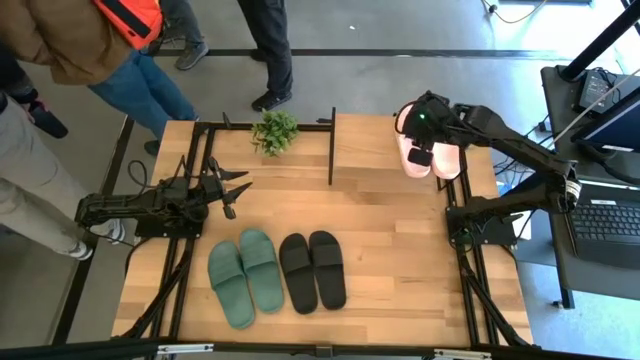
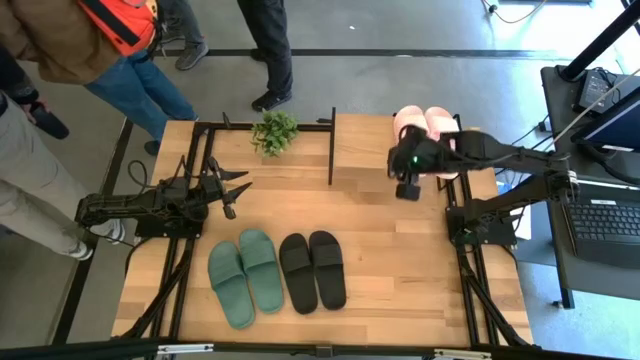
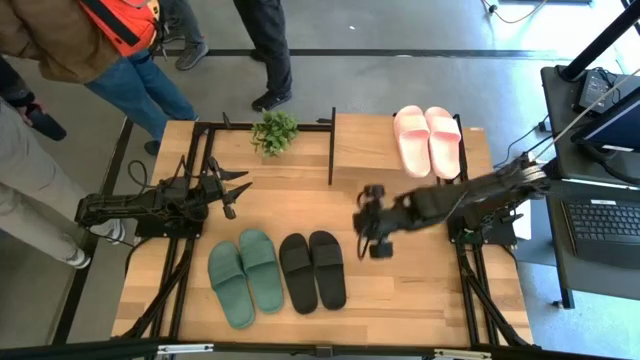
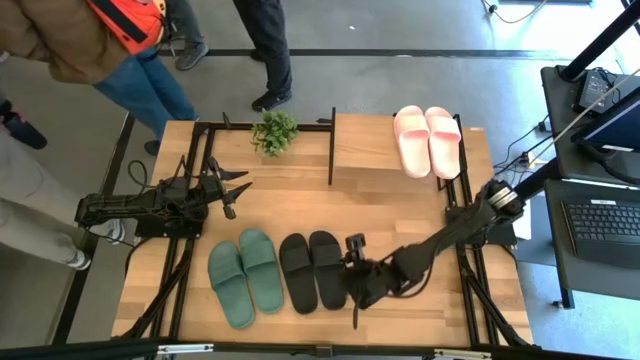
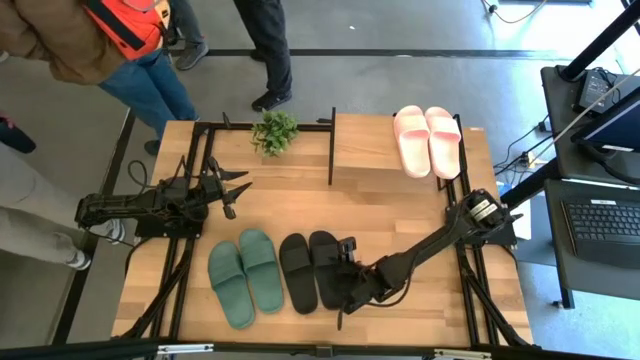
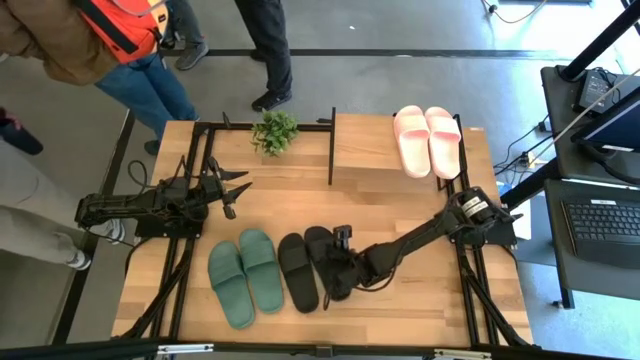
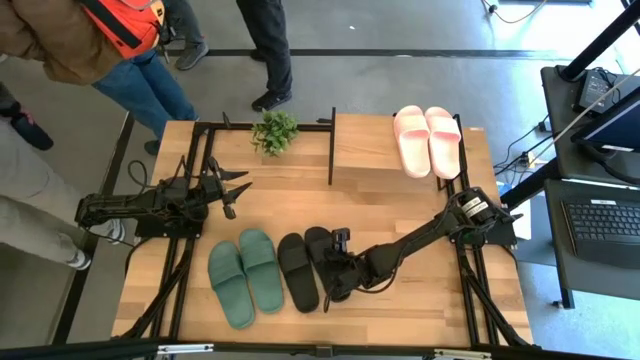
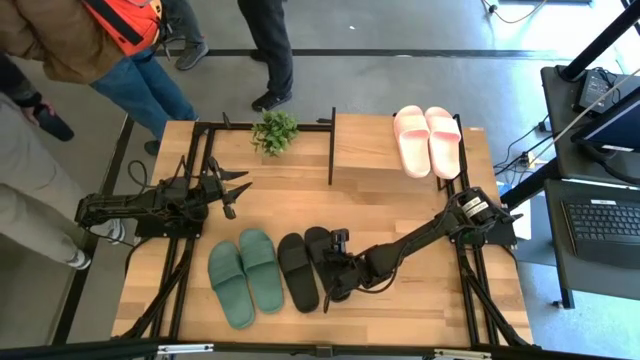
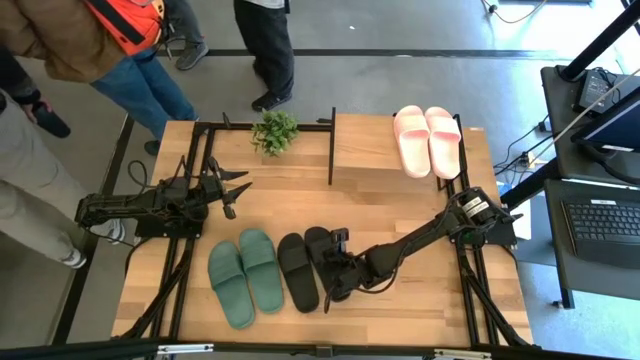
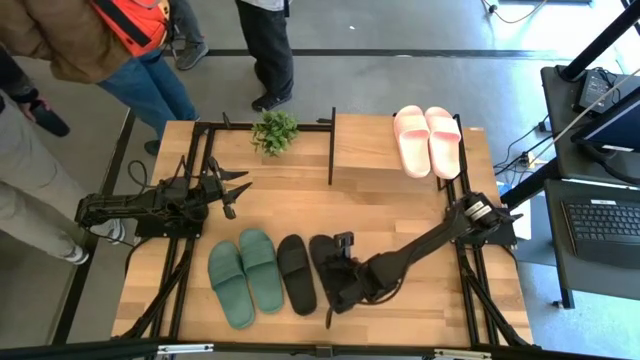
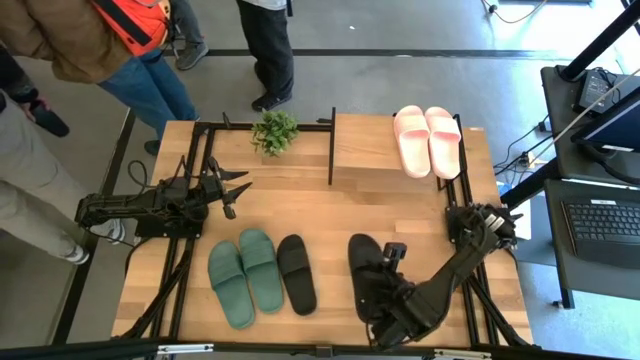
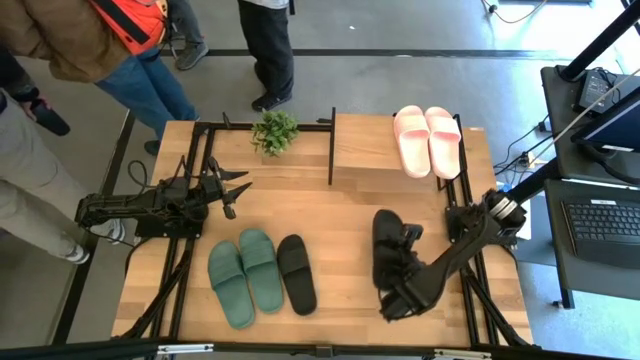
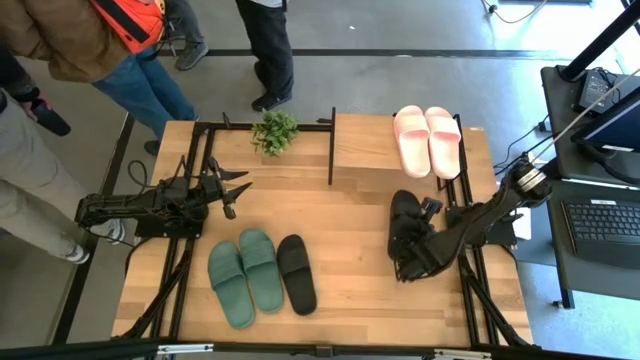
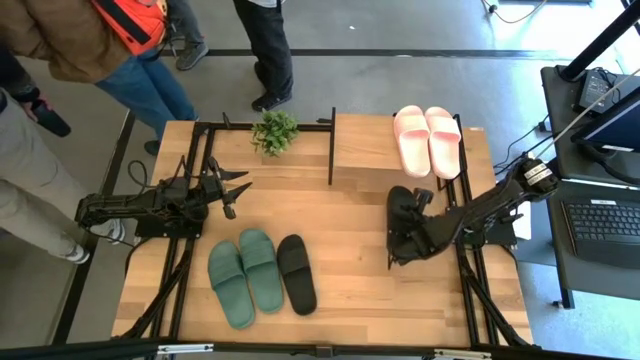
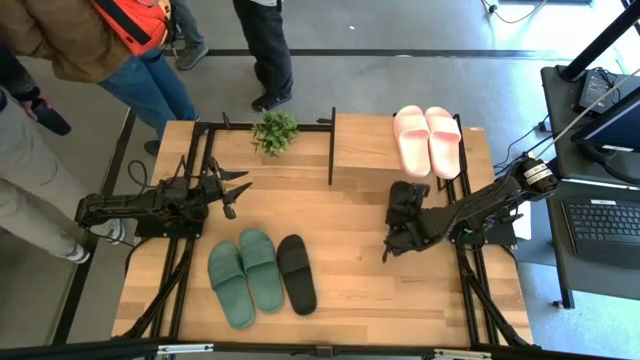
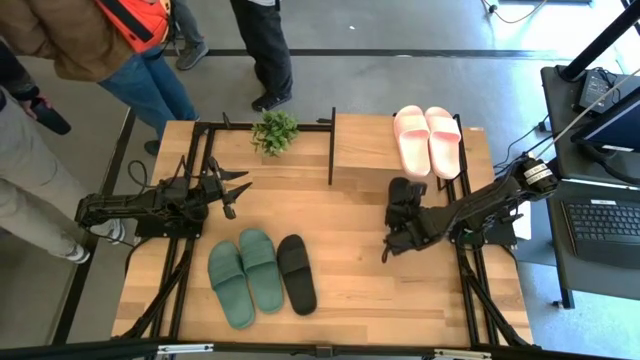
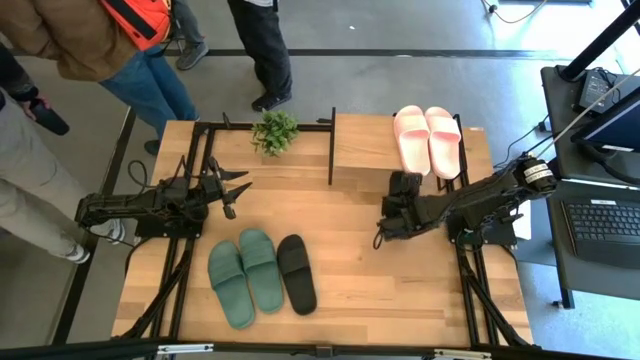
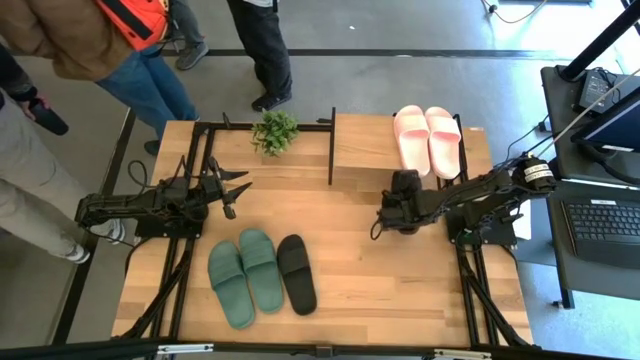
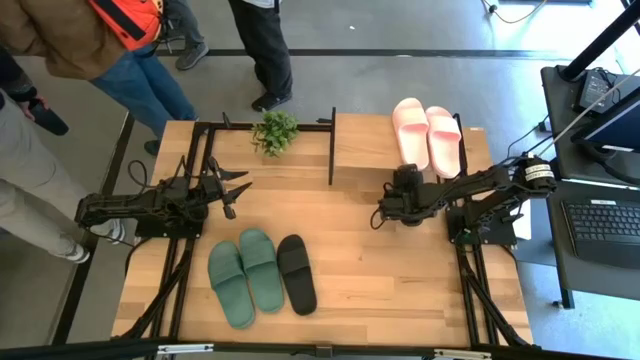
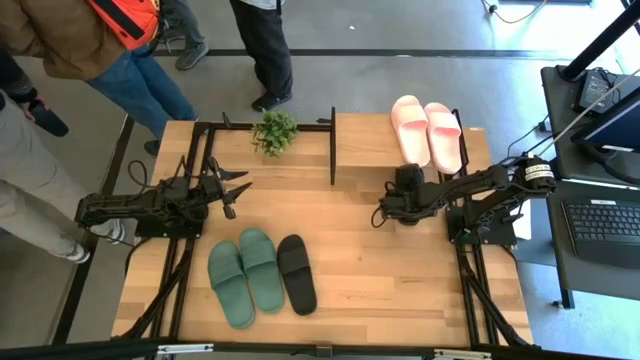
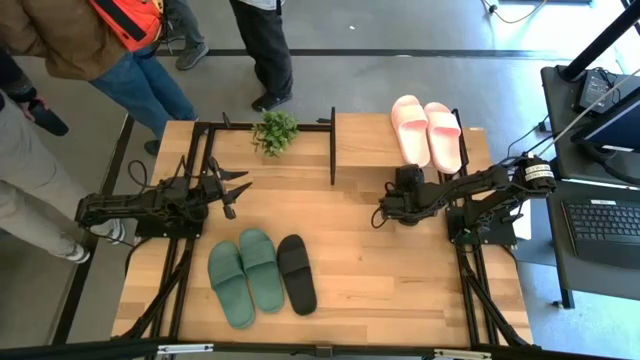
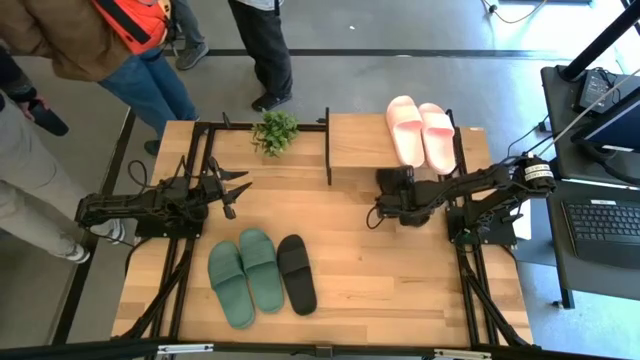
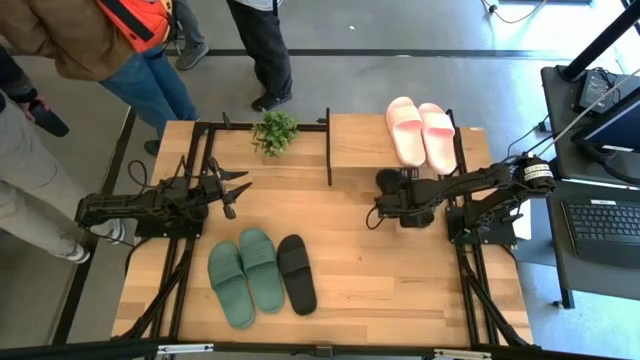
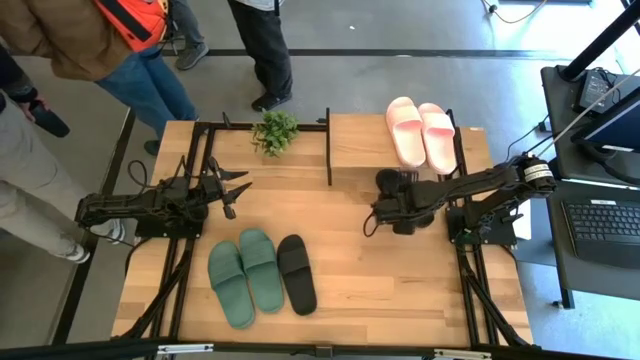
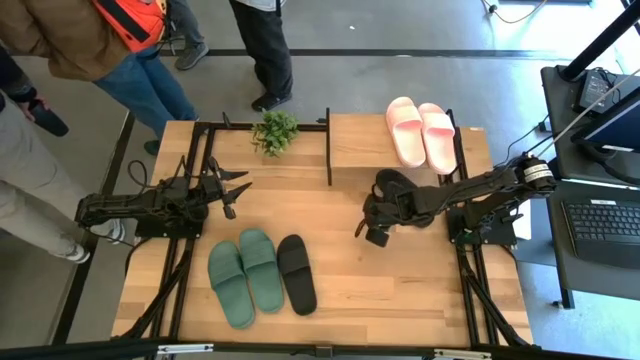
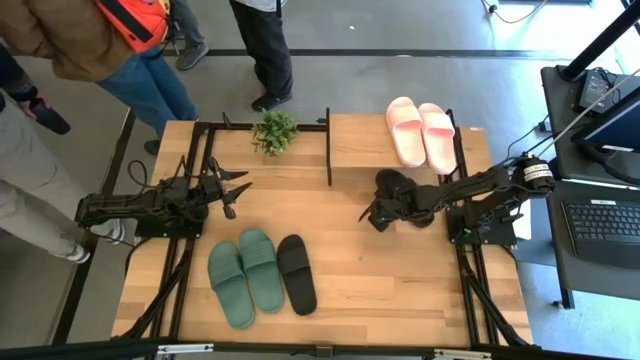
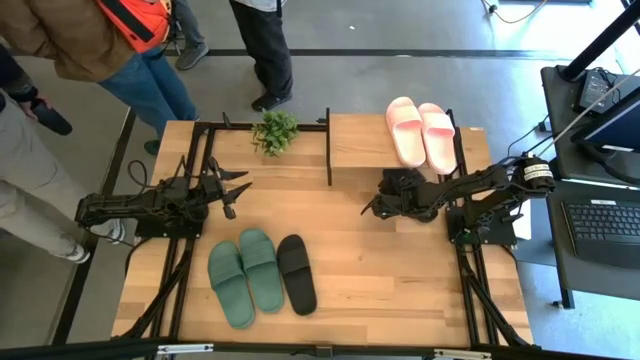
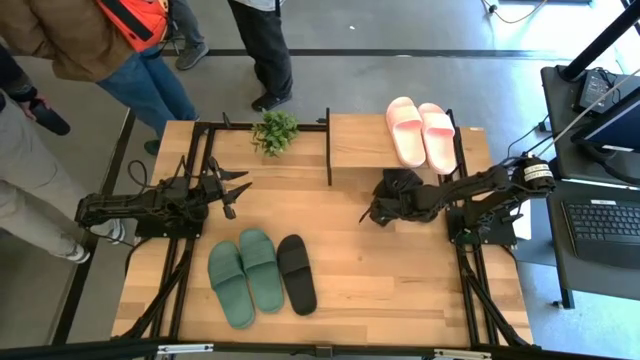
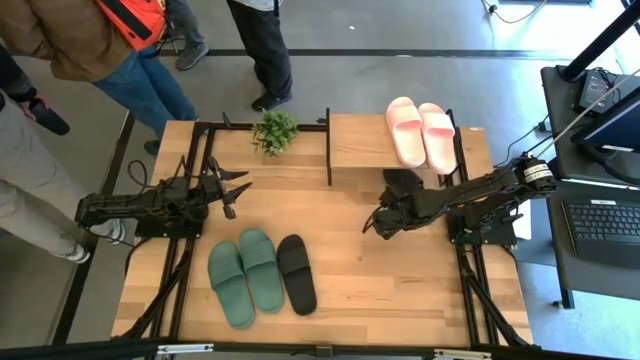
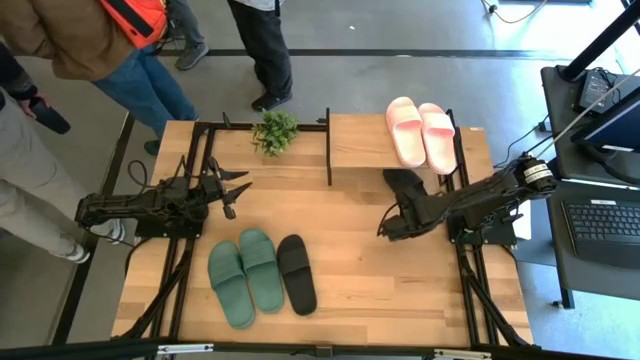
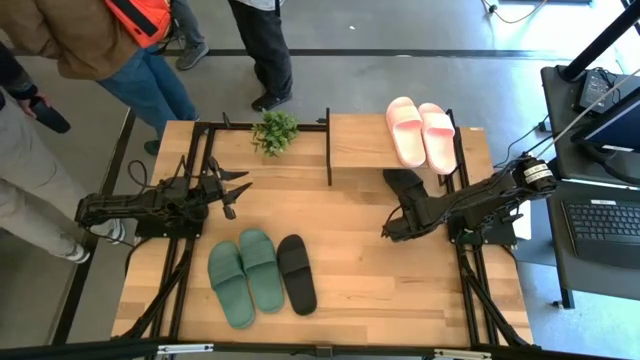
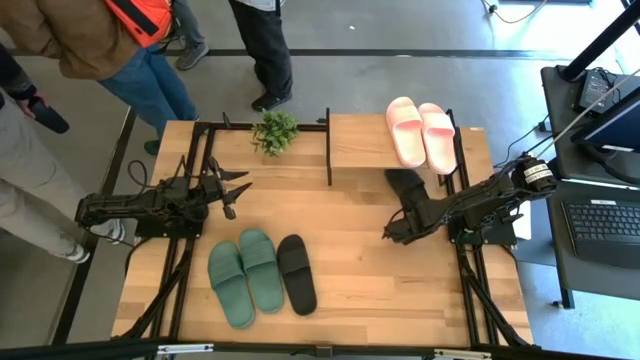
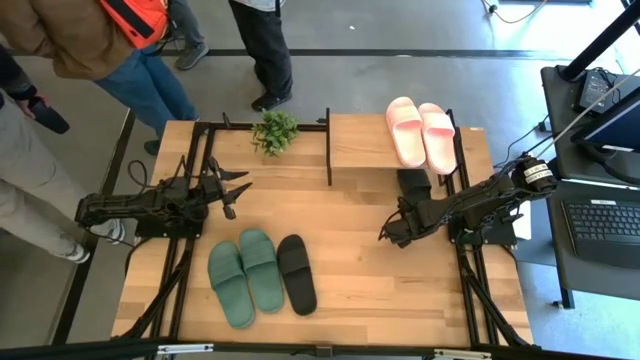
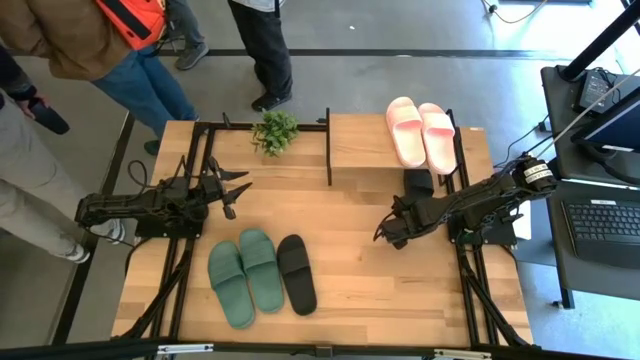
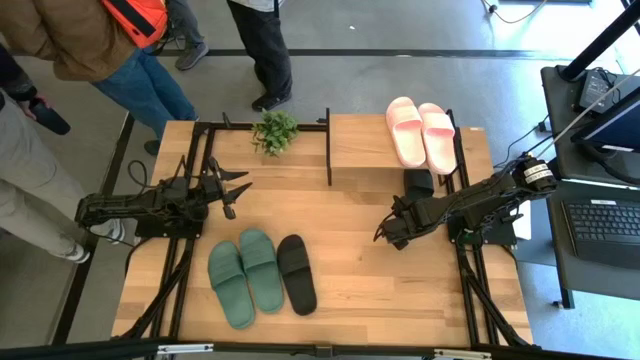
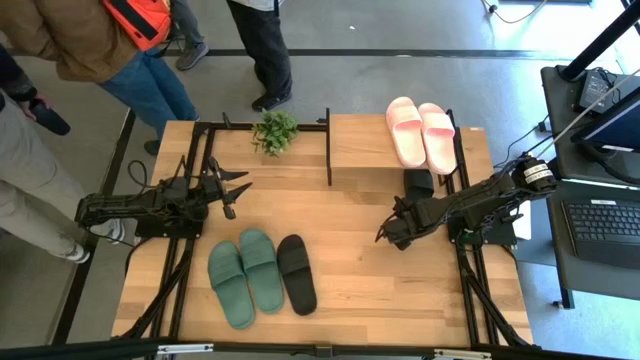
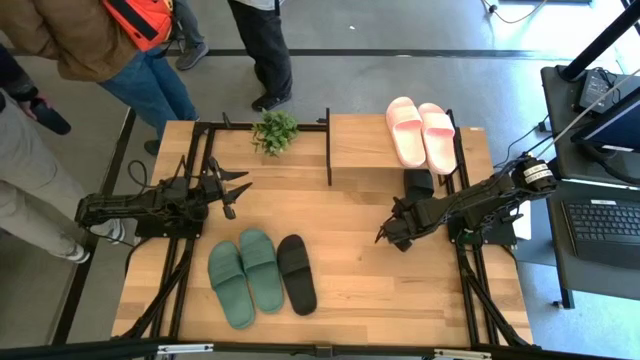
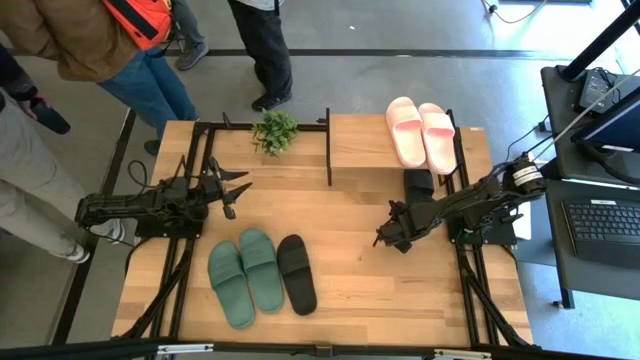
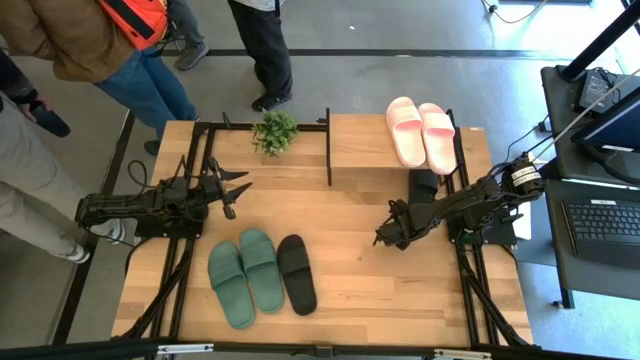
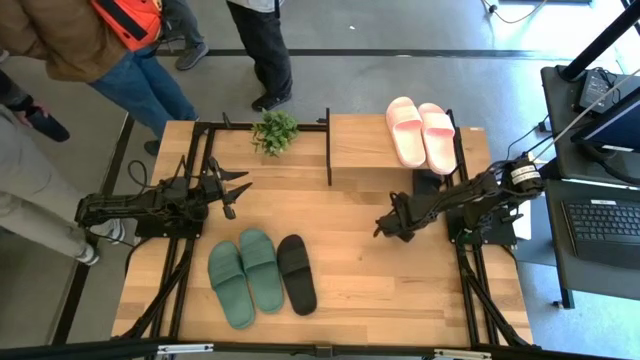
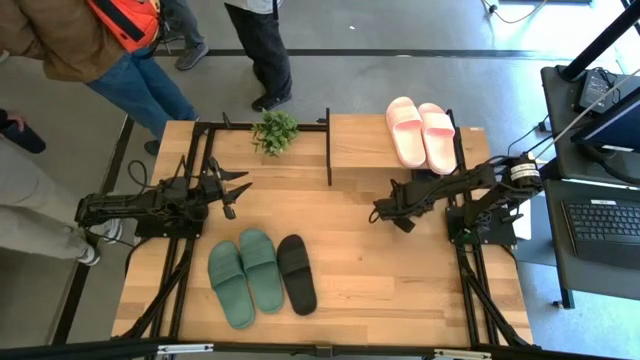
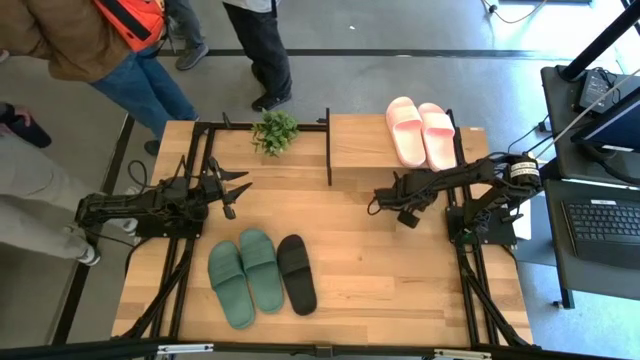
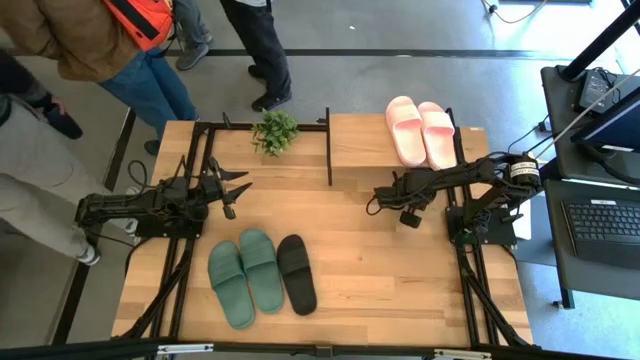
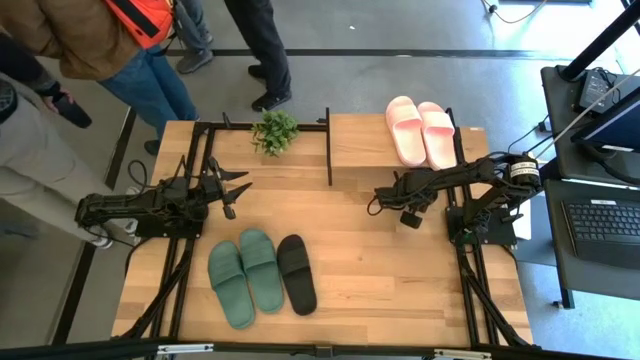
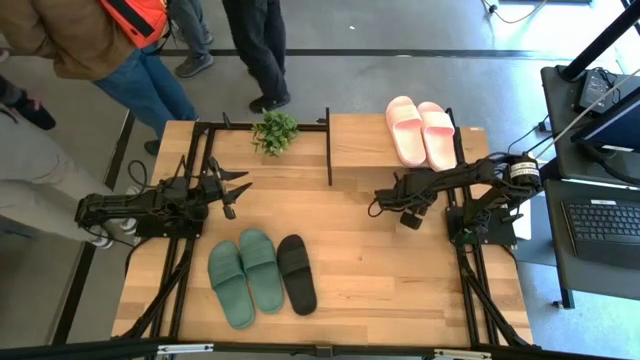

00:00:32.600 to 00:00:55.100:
Task: Pick and place slides into the shelf
Put the right black slide under the shelf
